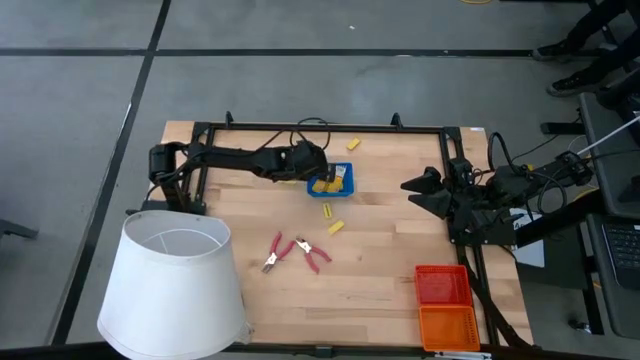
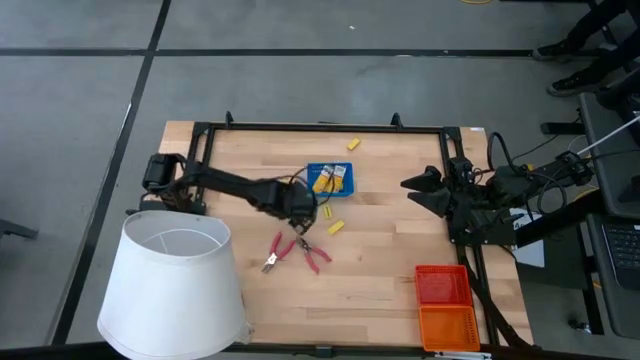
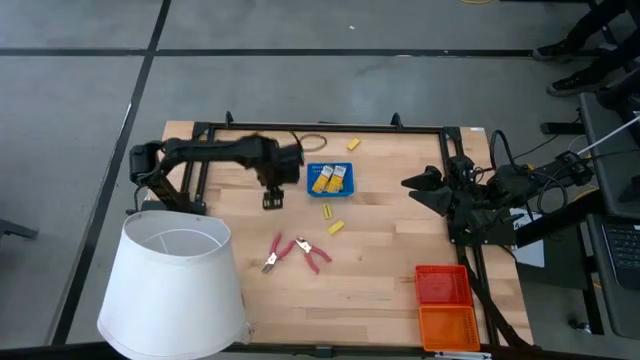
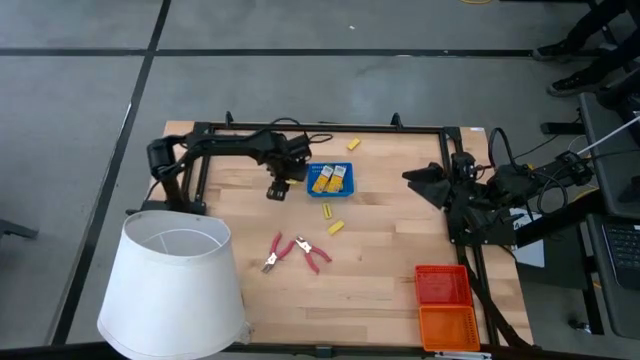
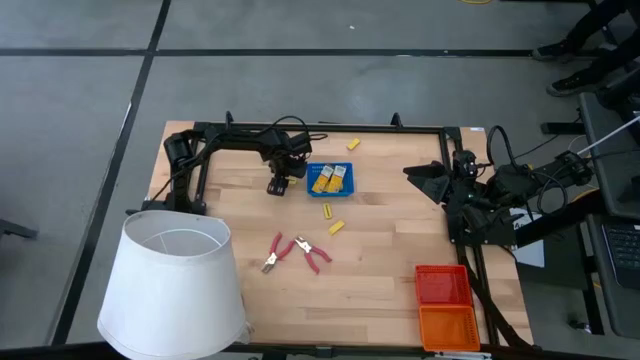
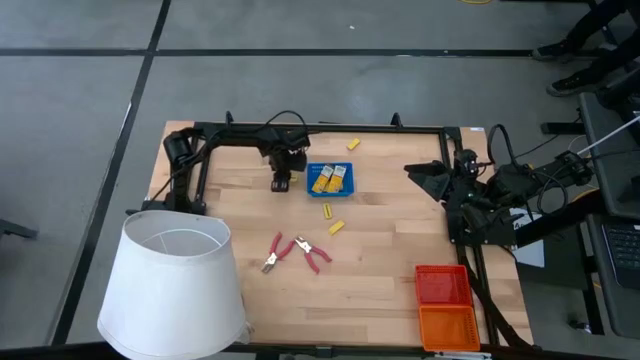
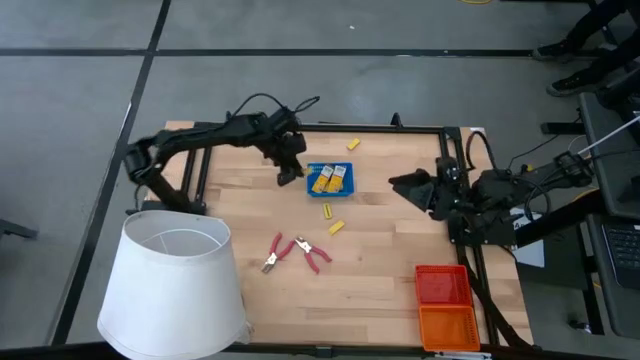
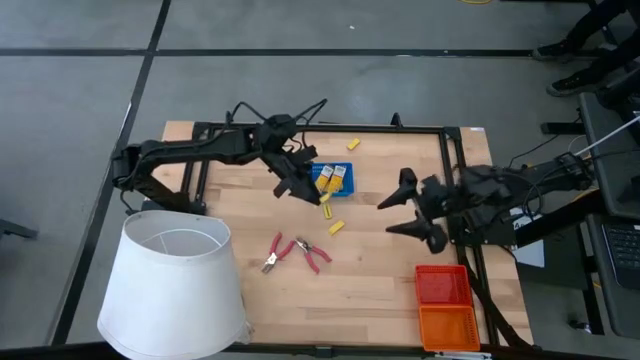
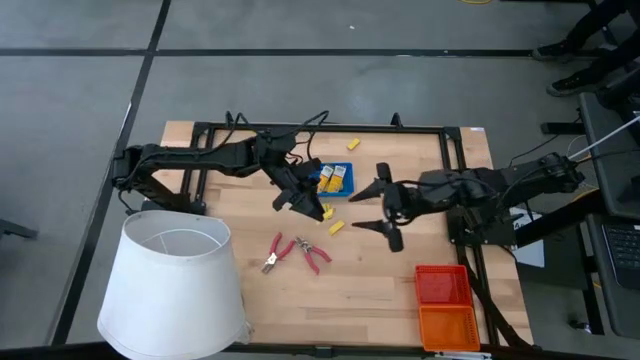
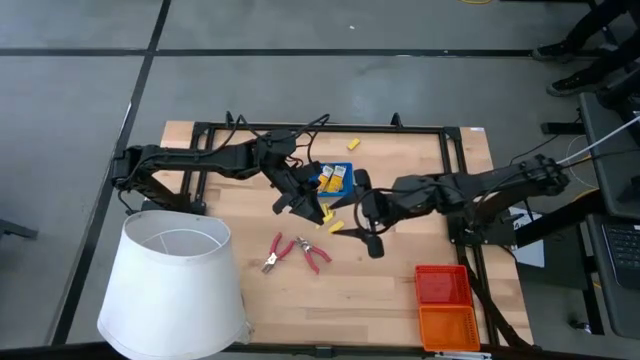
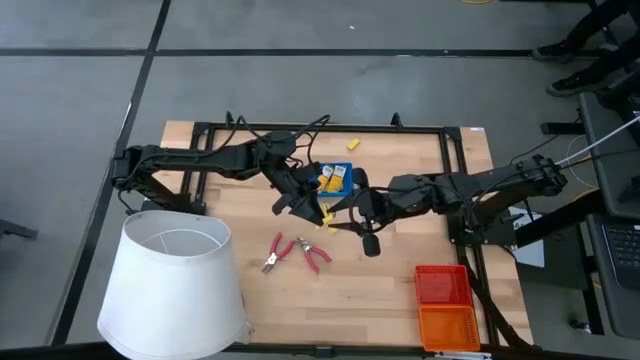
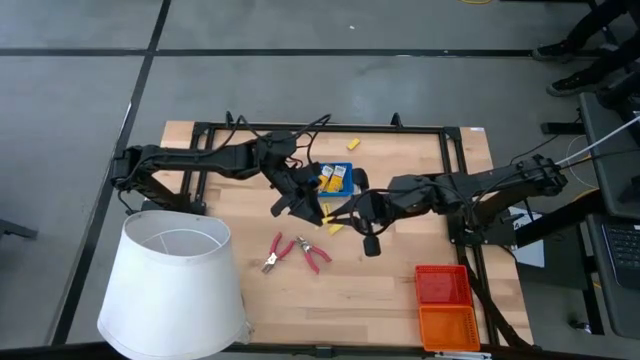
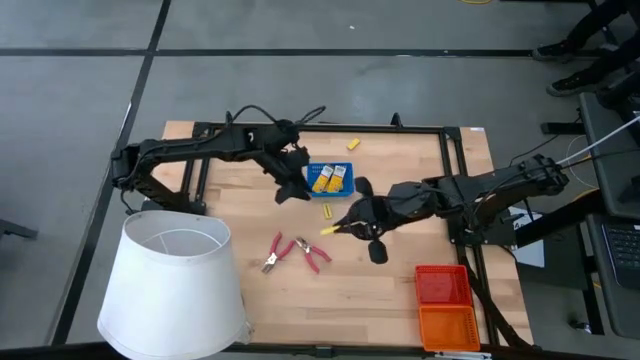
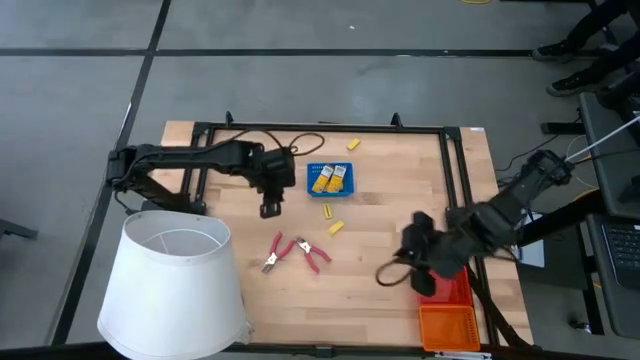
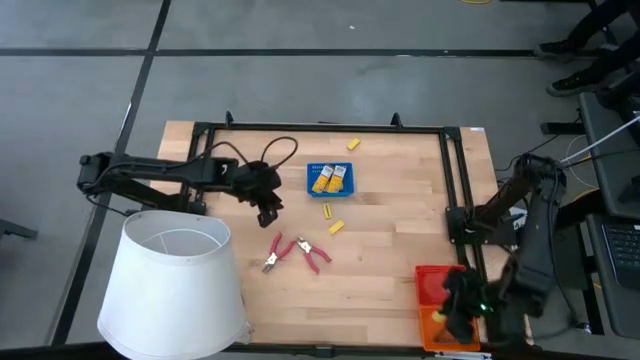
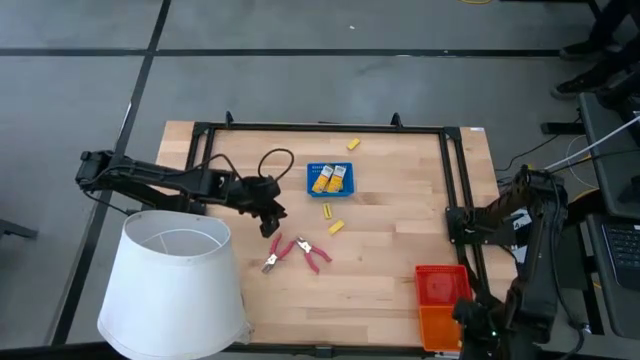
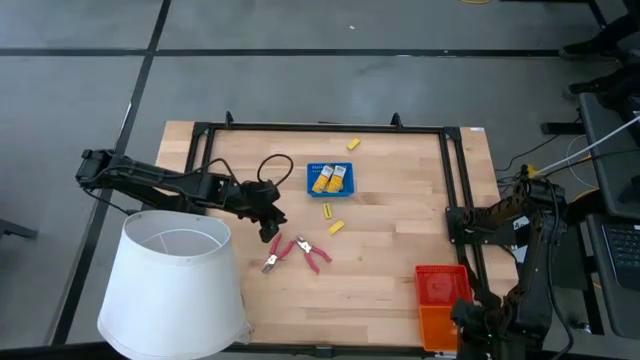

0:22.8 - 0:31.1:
Task: Pick & Place School Supplies
Put the yellow eraser into the orange bin

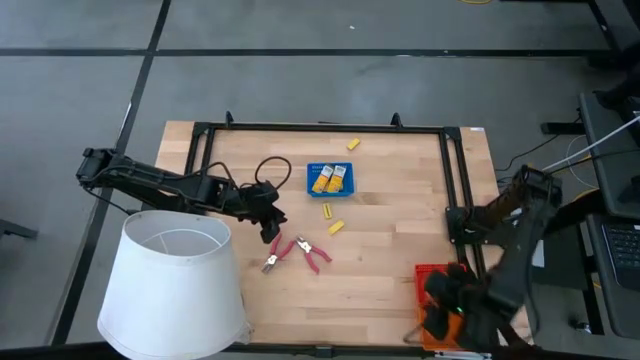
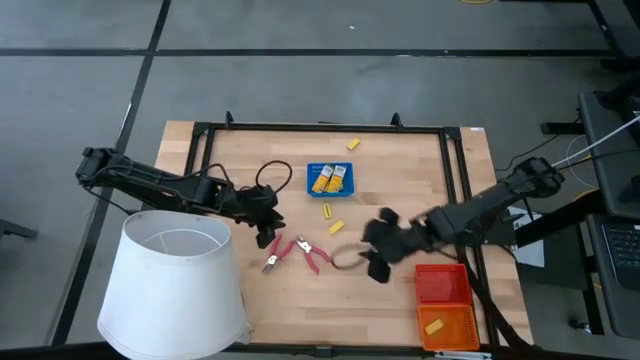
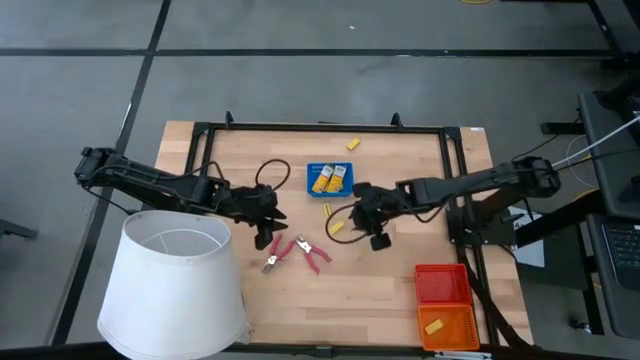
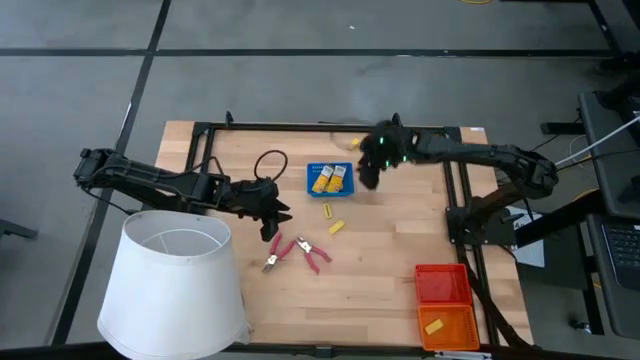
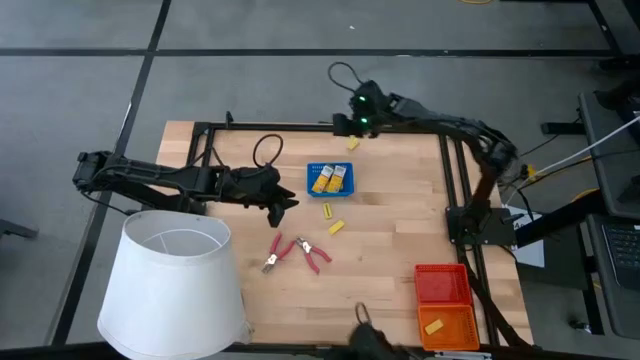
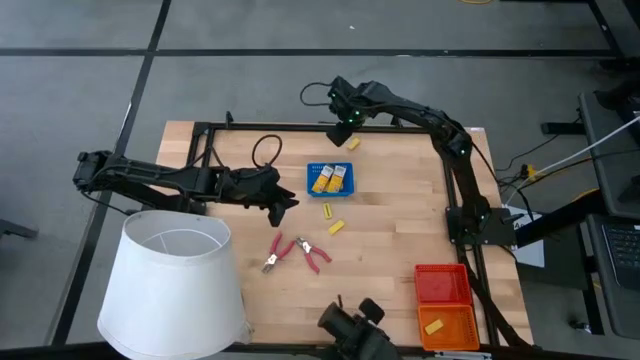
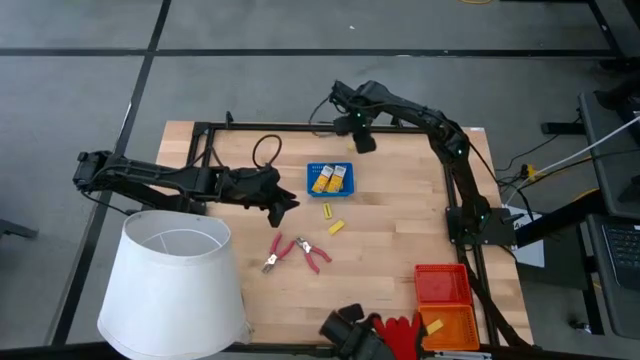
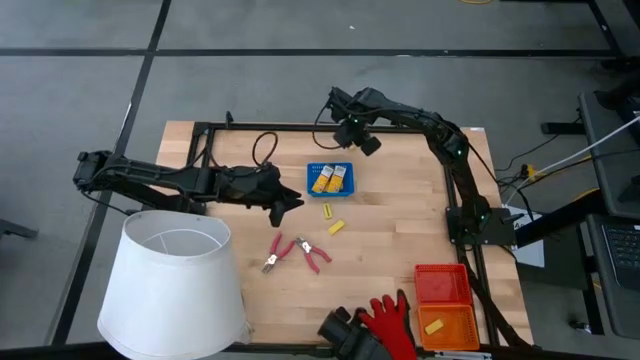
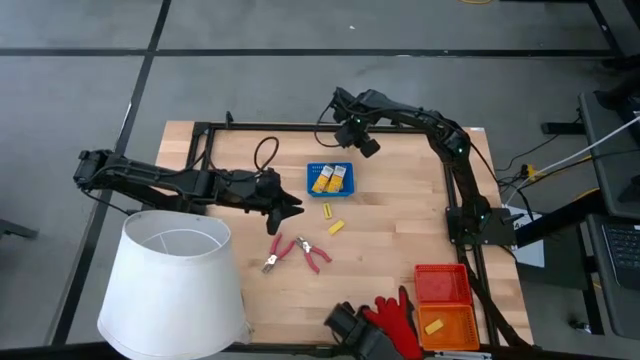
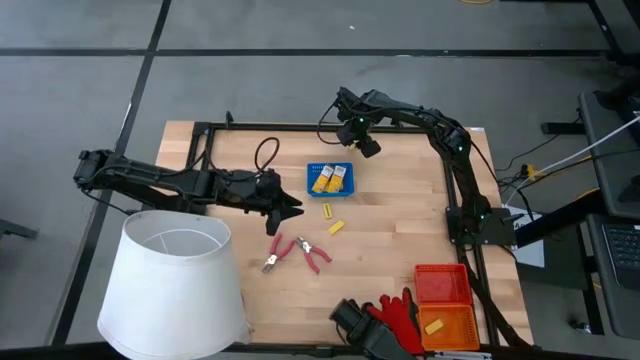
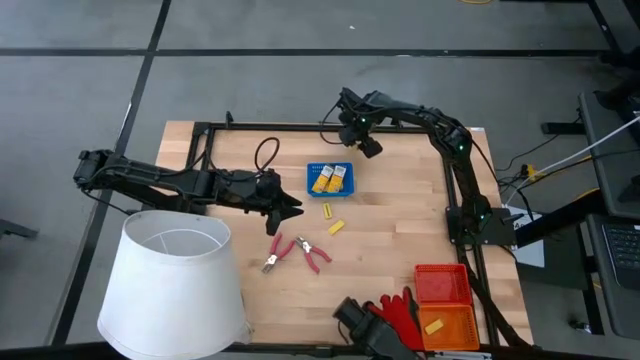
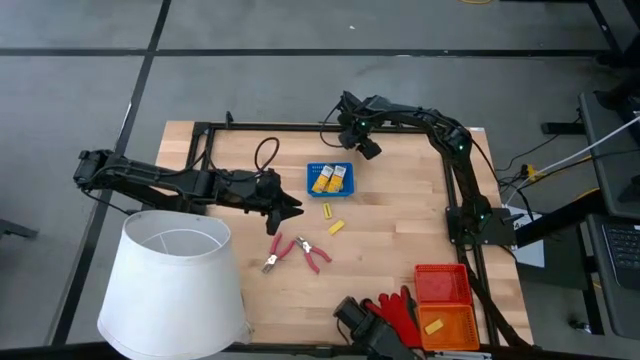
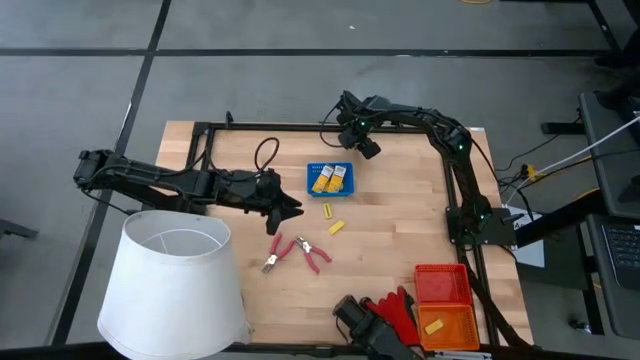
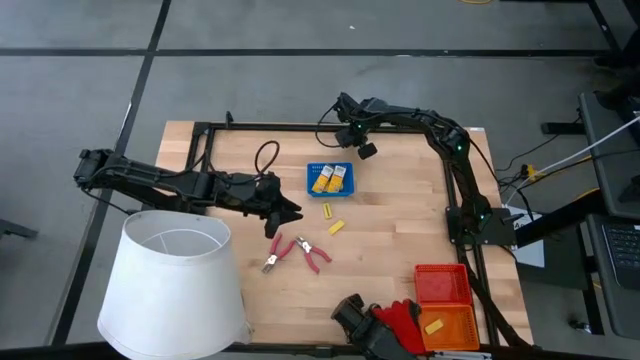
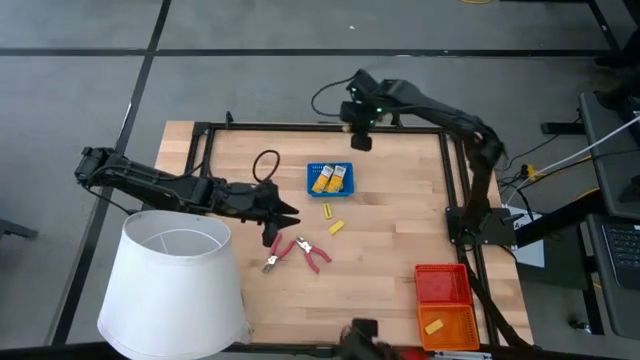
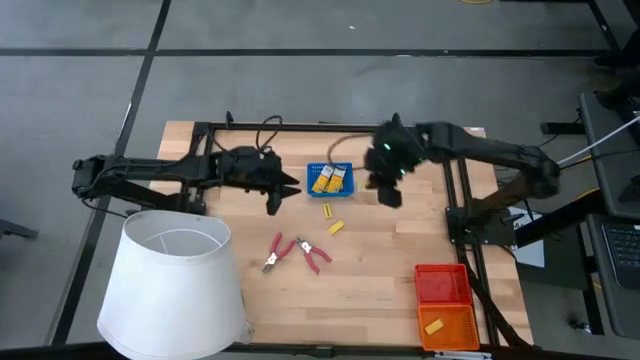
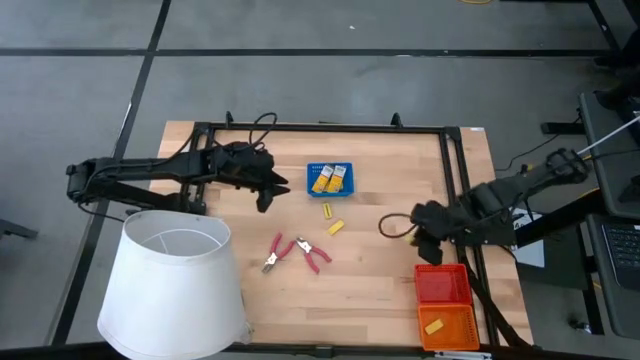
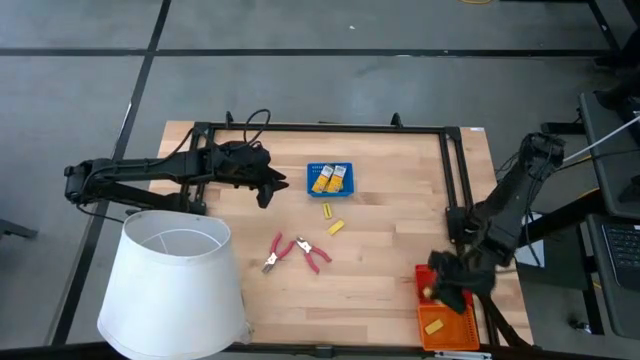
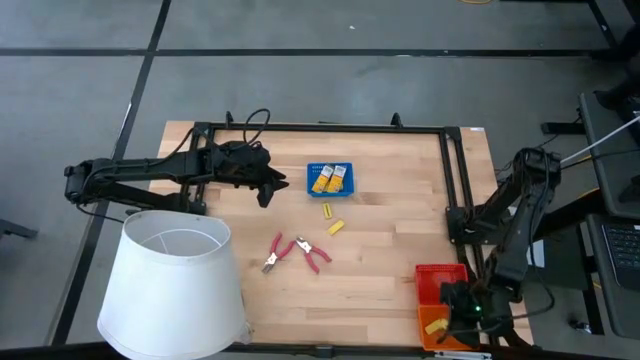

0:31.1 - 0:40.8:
Put the yellow eraser into the orange bin

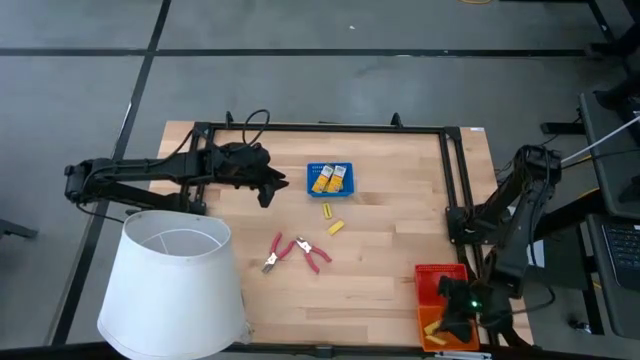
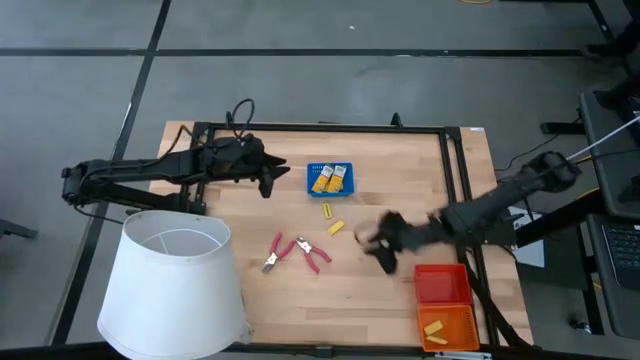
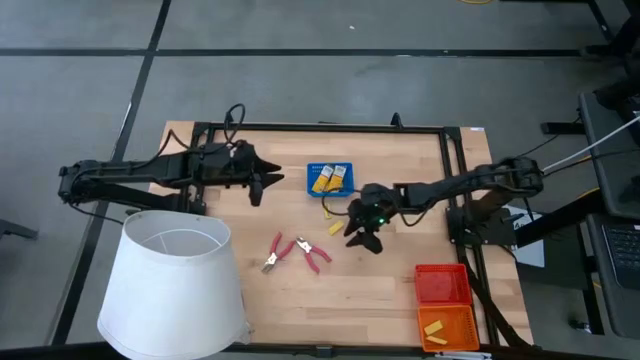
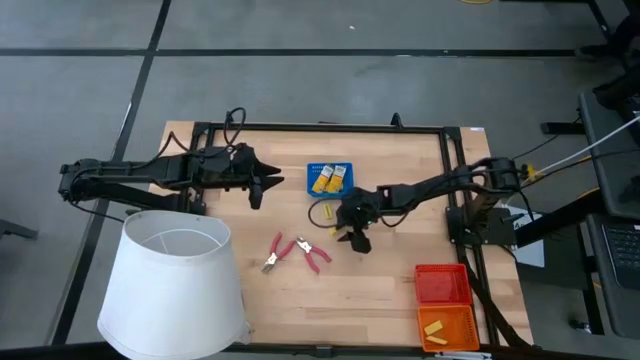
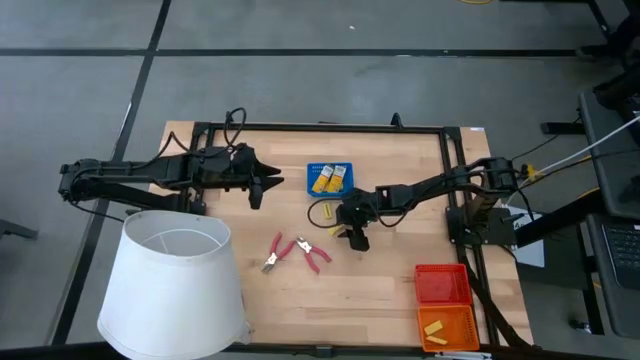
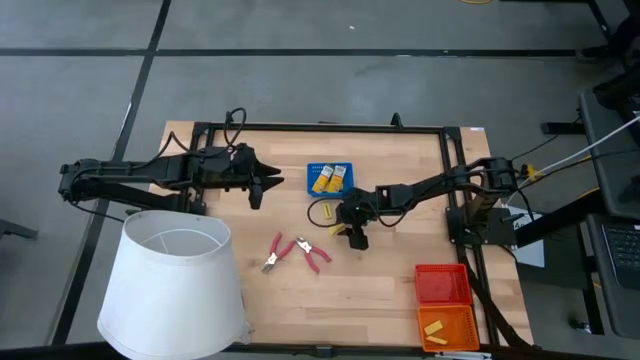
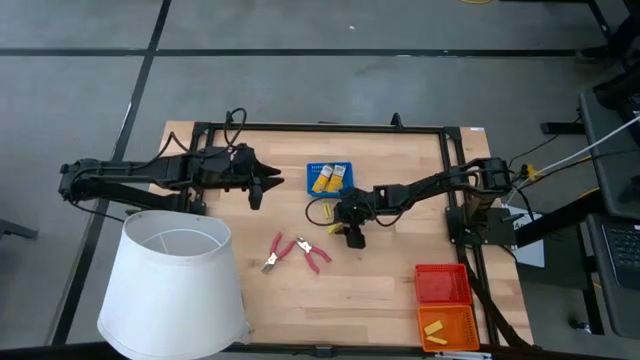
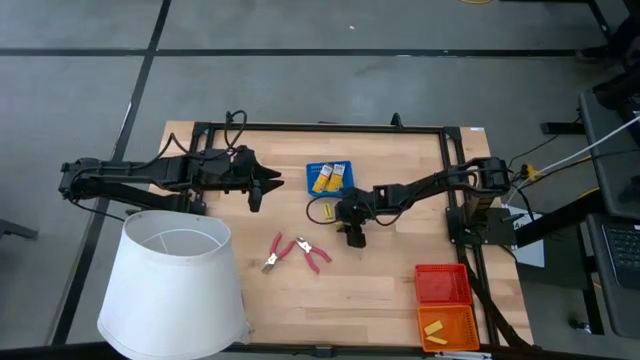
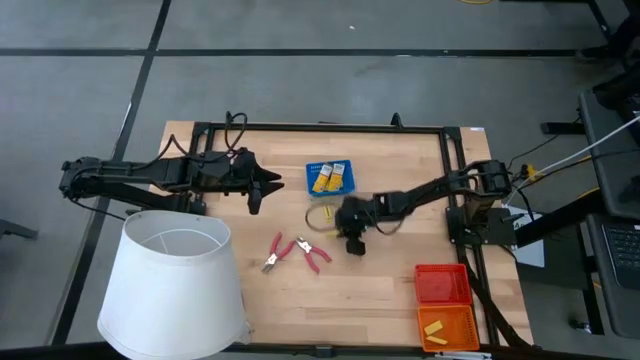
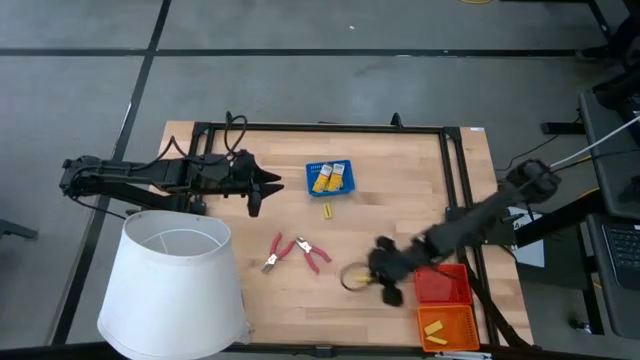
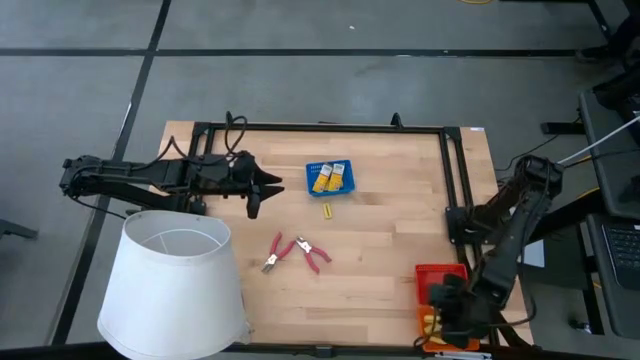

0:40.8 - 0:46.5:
Put the yellow eraser into the orange bin
